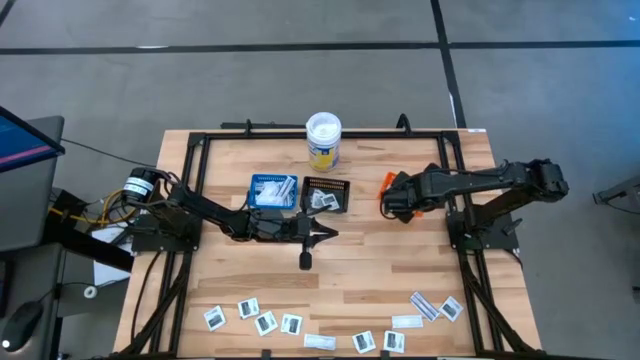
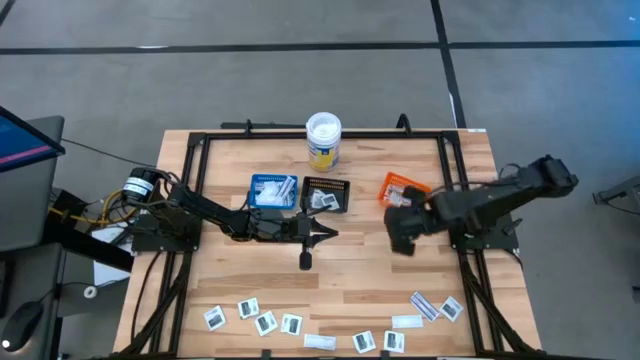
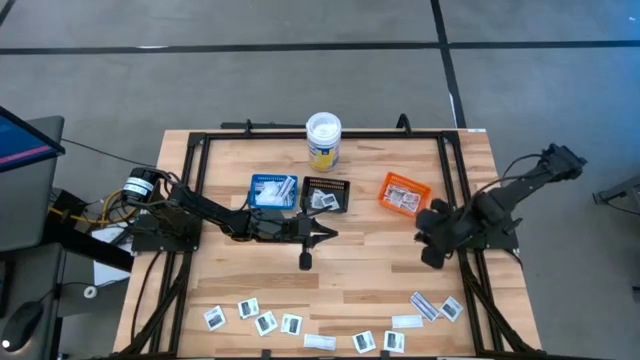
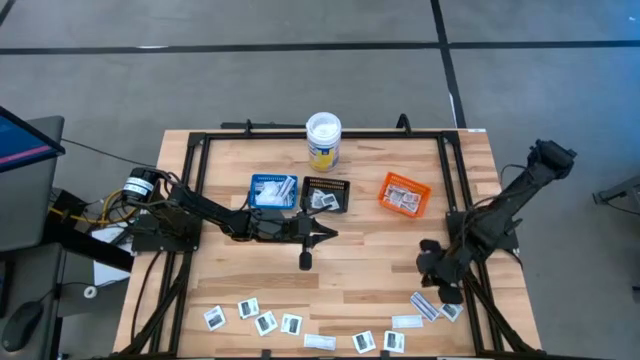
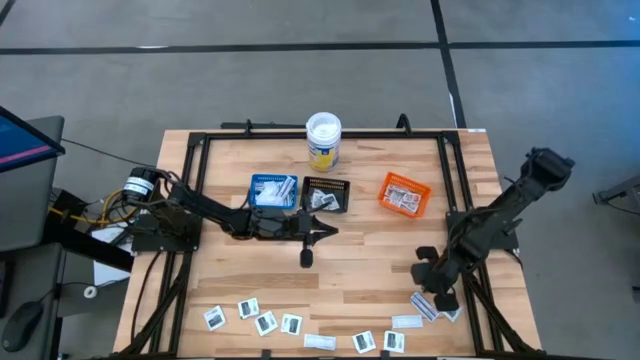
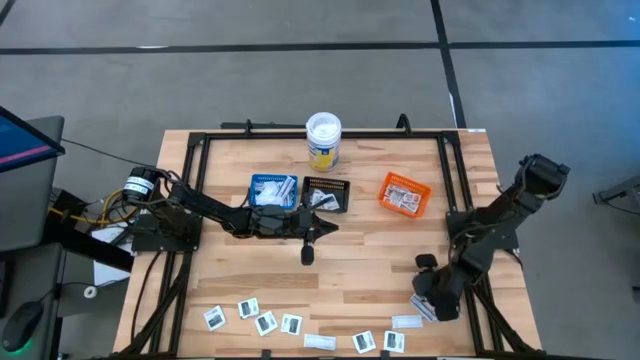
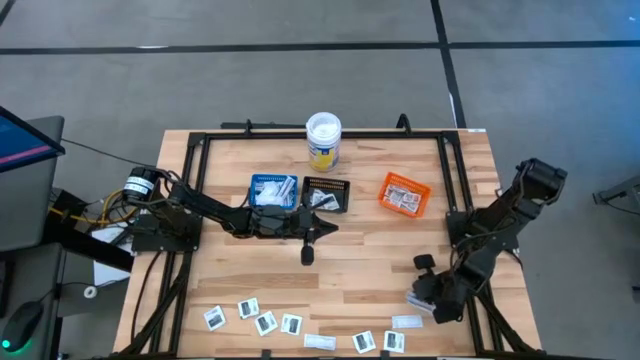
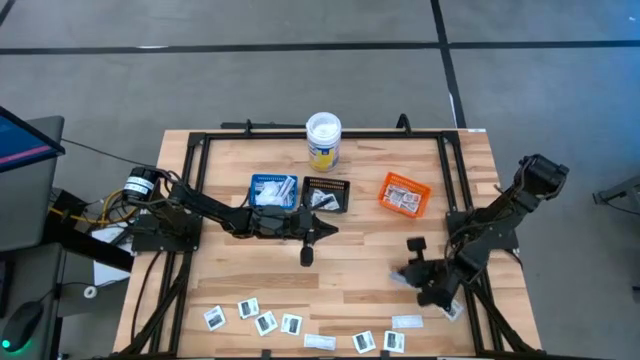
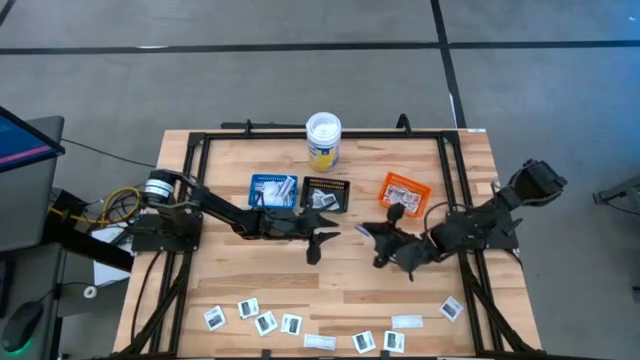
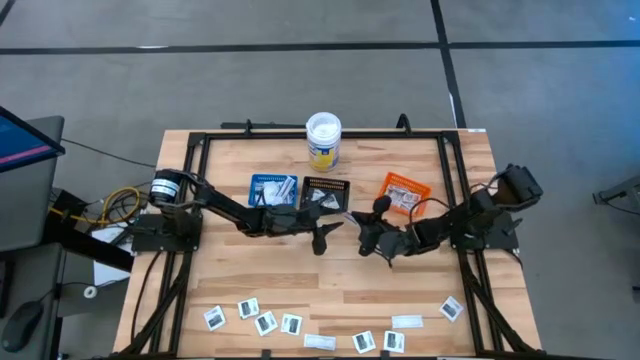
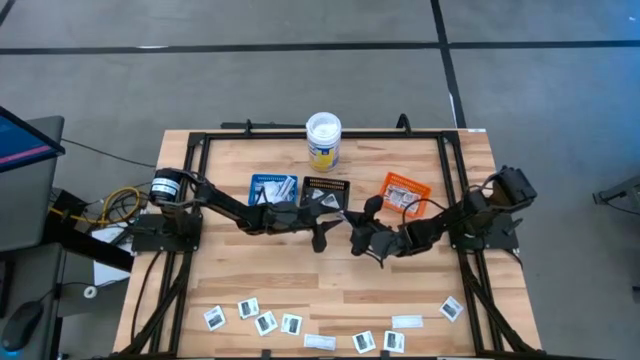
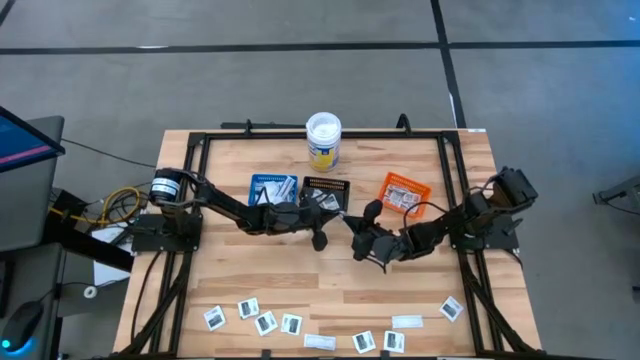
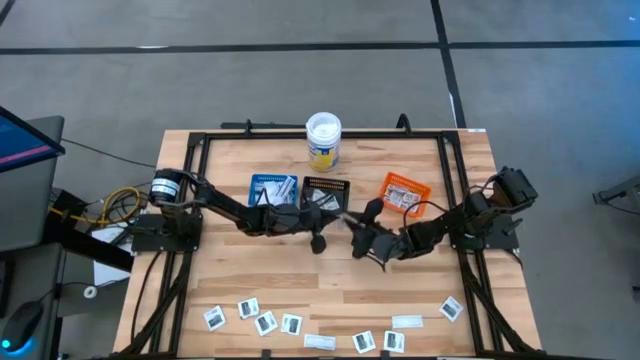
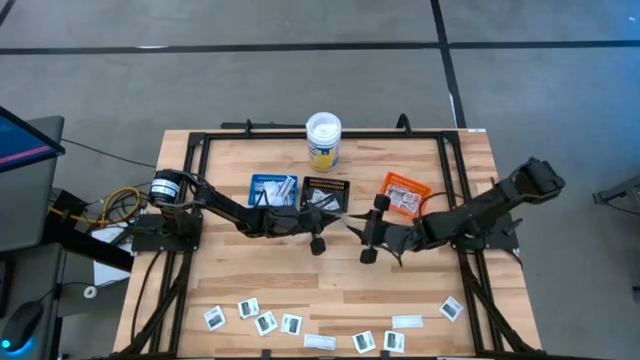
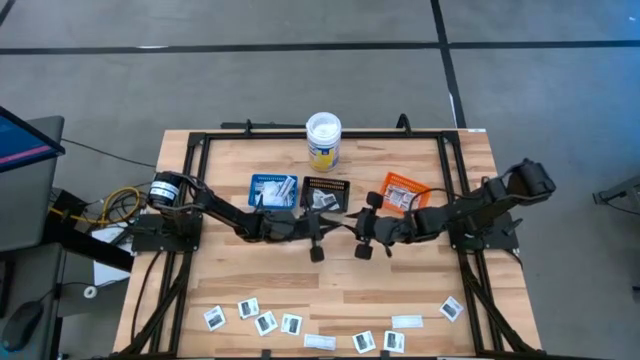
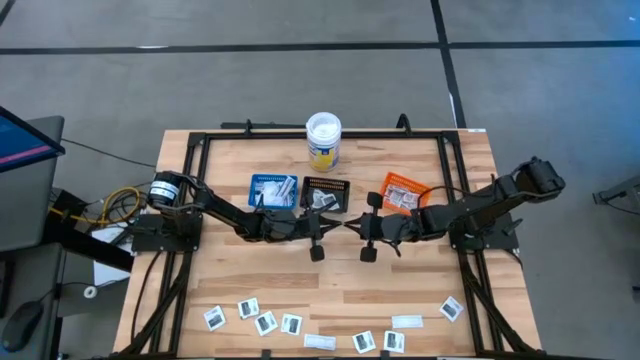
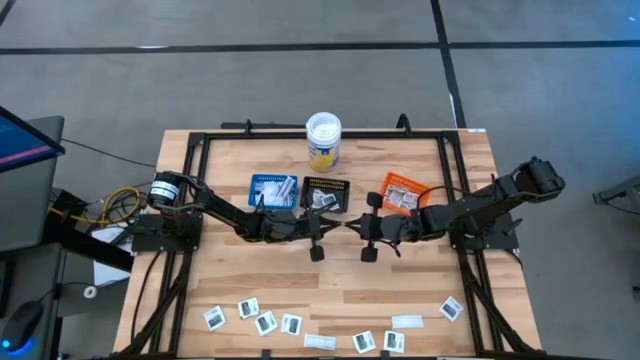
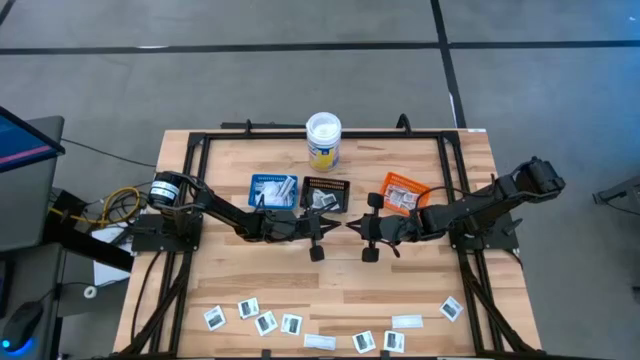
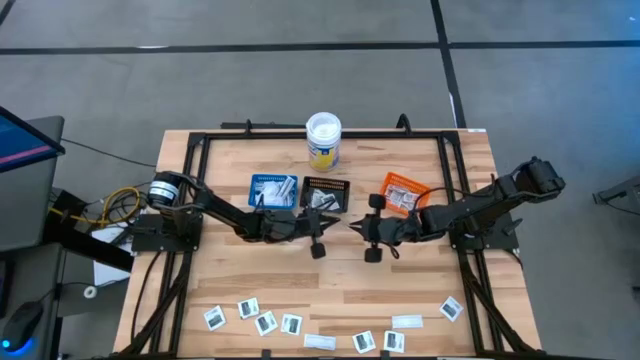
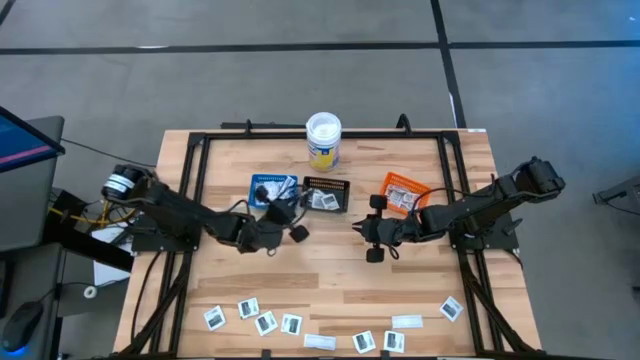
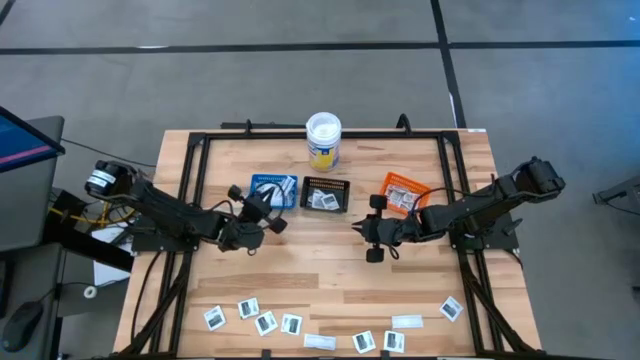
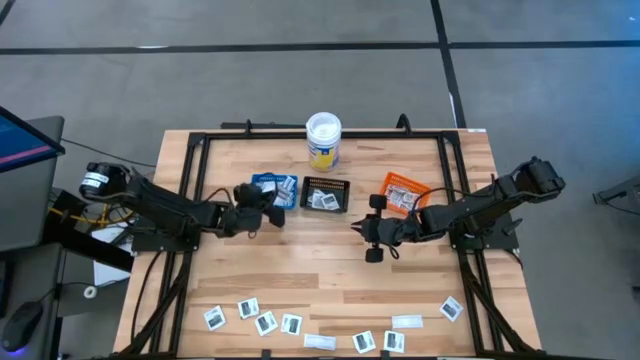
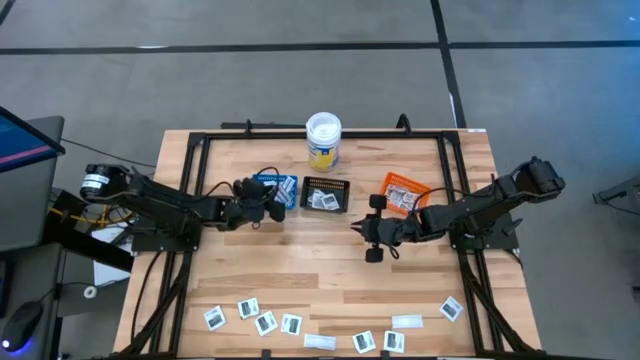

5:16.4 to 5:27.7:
Task: Pick & Place First Aid Supplies
Put the blue bandage into the blue bin

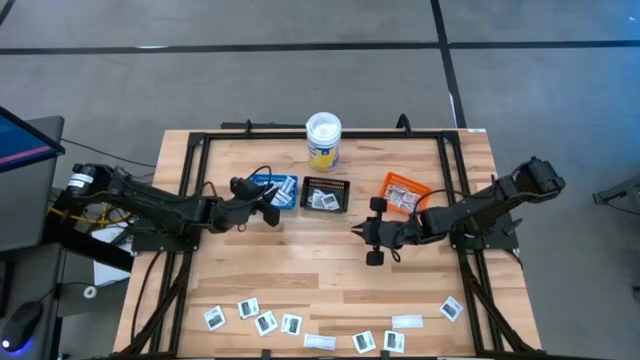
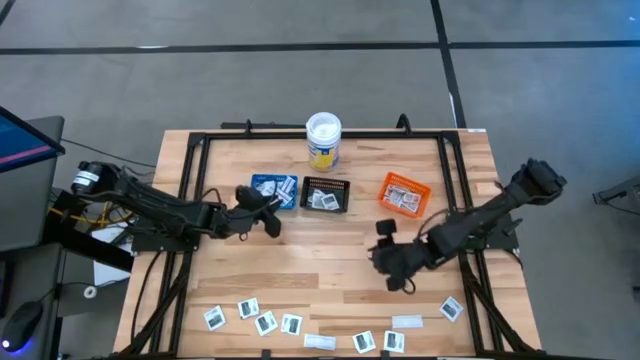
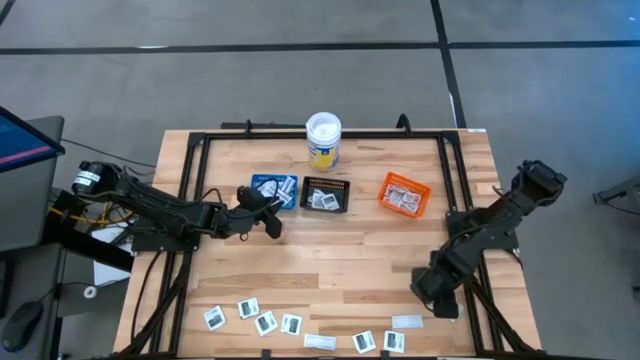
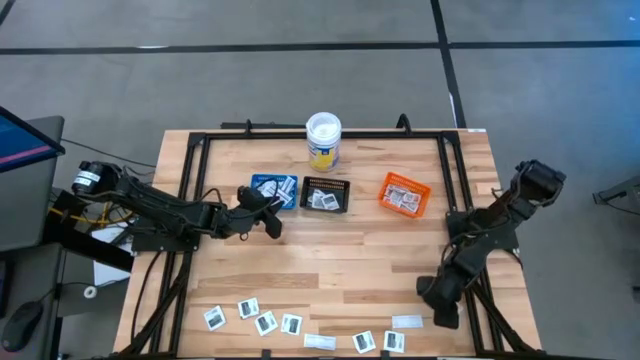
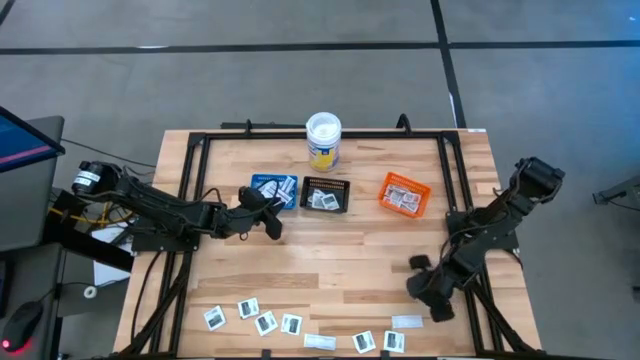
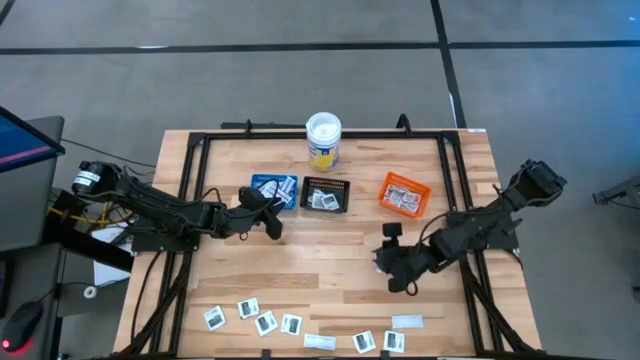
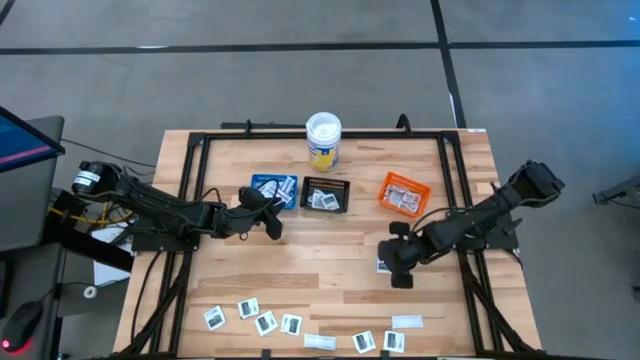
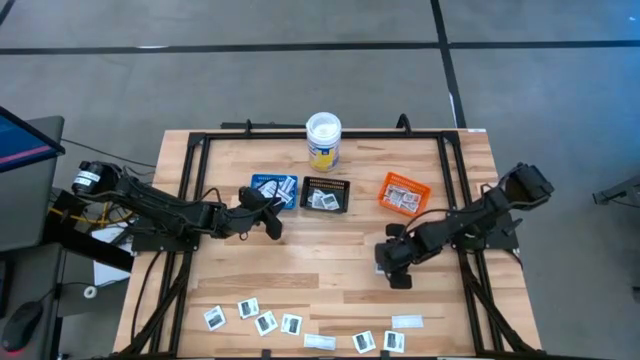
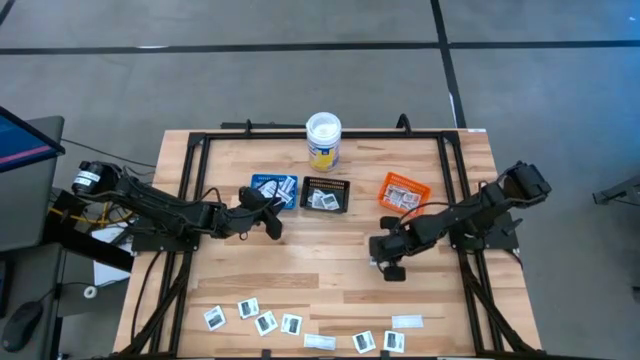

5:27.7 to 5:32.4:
Put the black towelette pack into the black bin

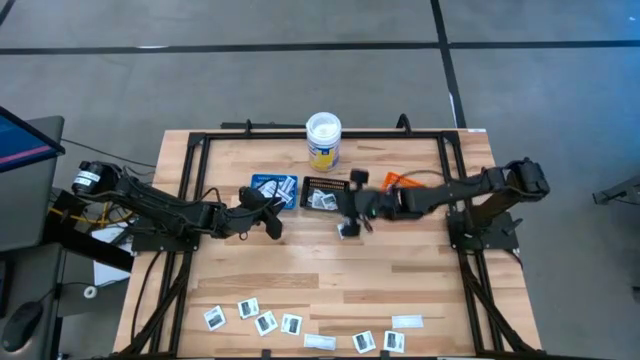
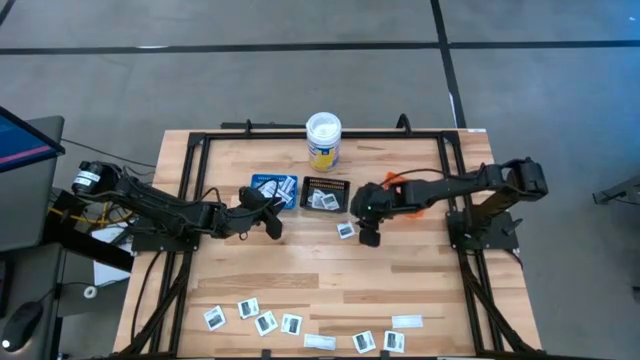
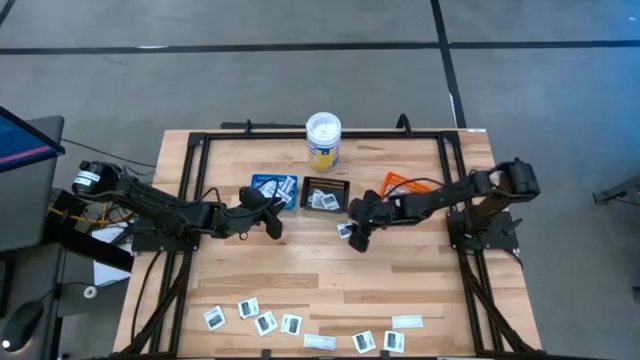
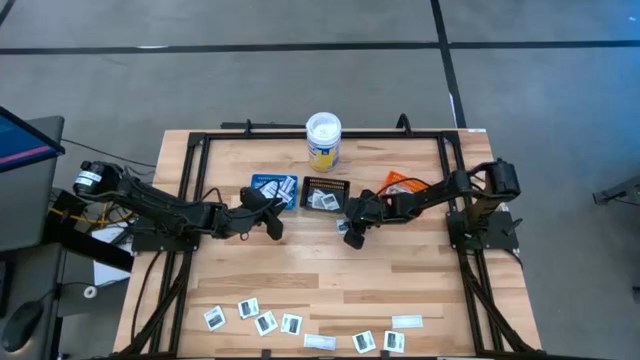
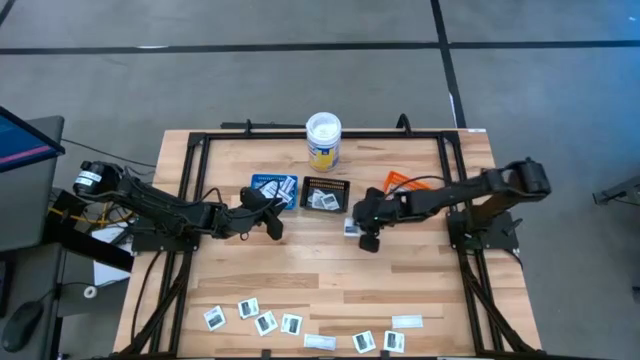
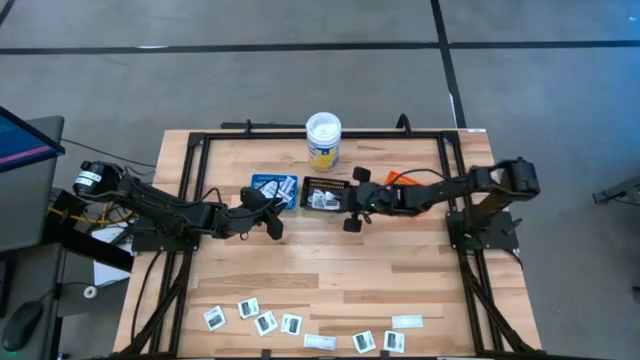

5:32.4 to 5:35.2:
Put the black towelette pack into the black bin

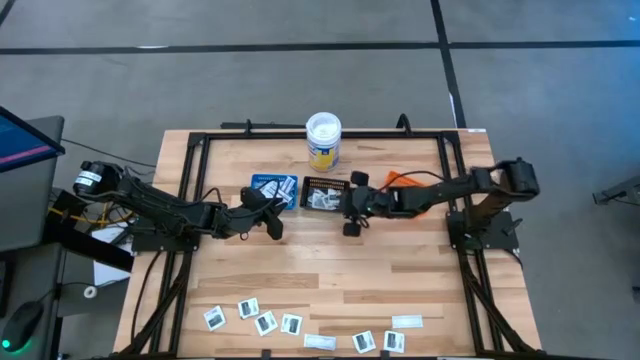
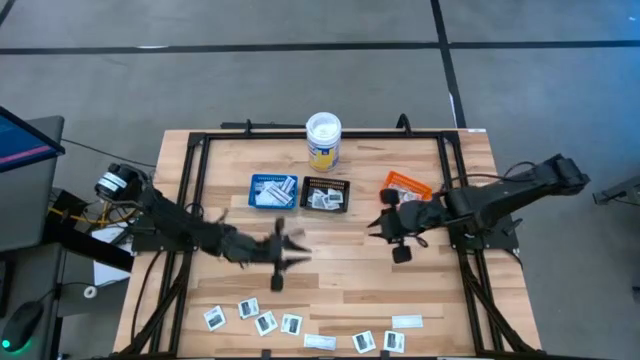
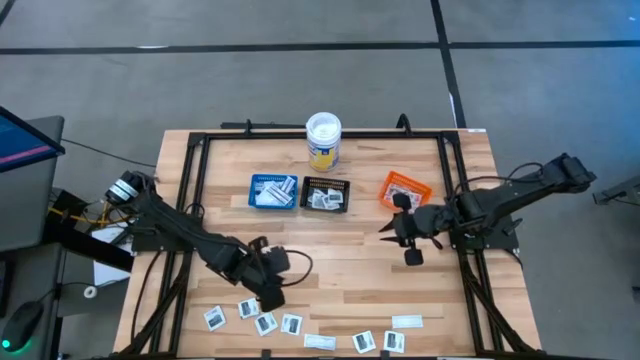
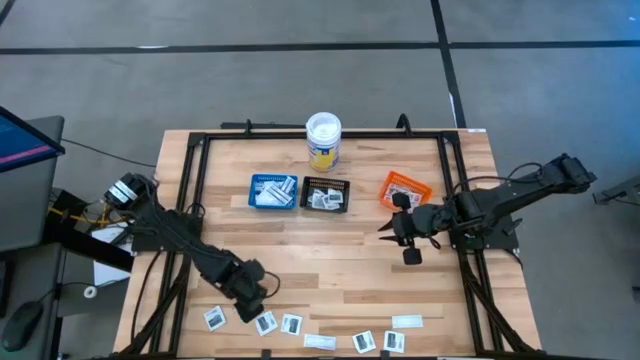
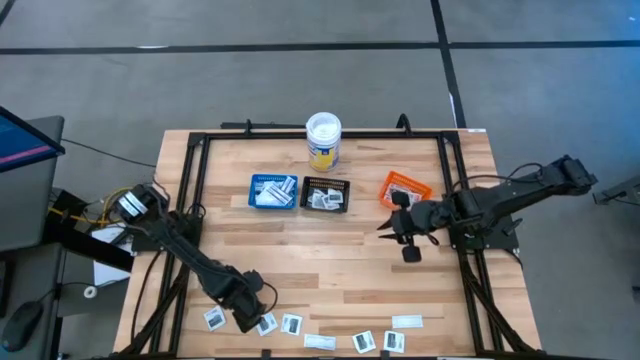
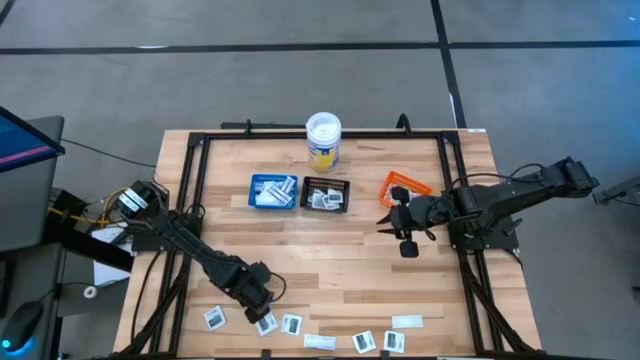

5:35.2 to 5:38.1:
Put the black towelette pack into the black bin

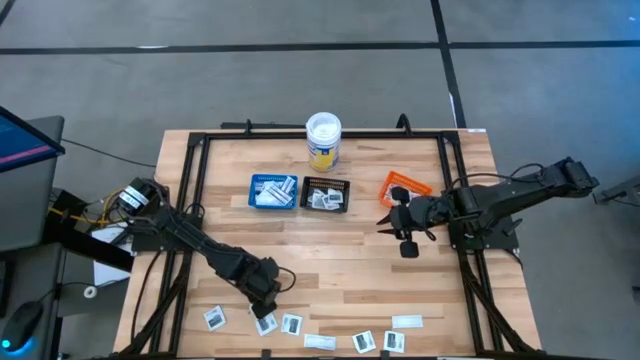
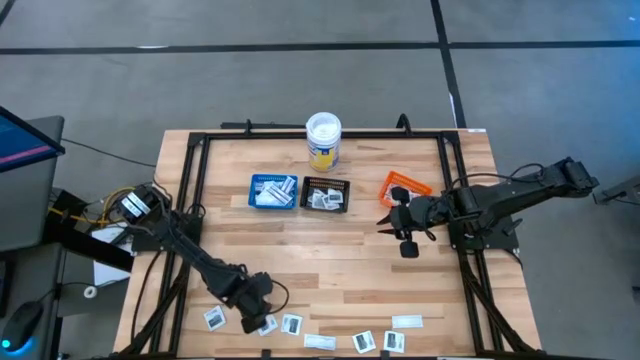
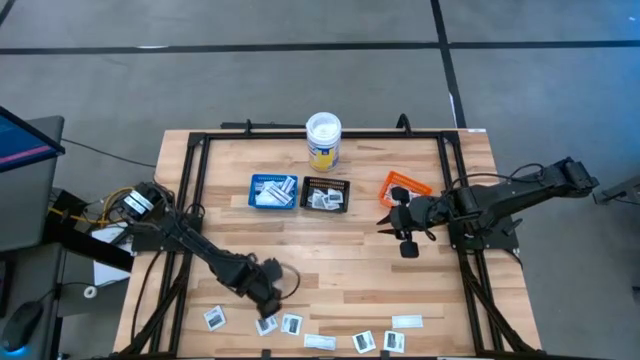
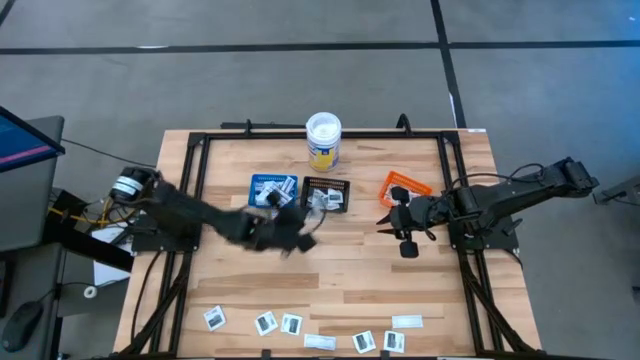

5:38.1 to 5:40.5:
Put the black towelette pack into the black bin
